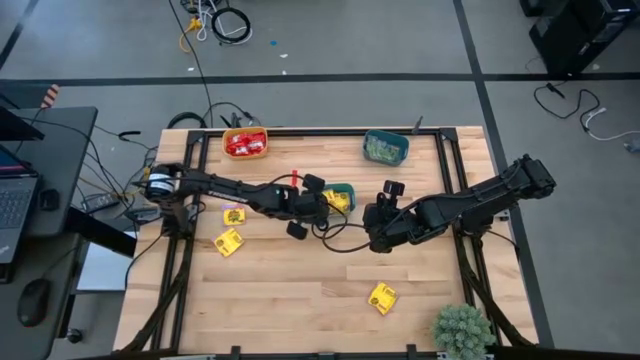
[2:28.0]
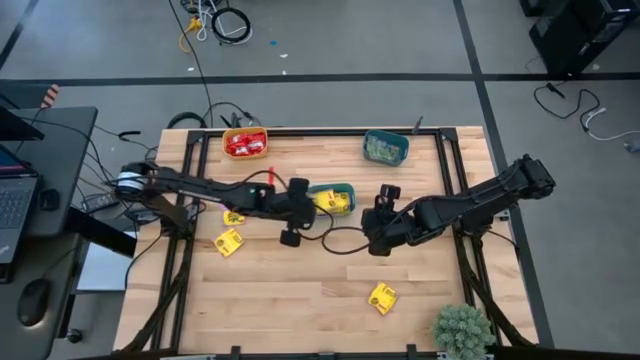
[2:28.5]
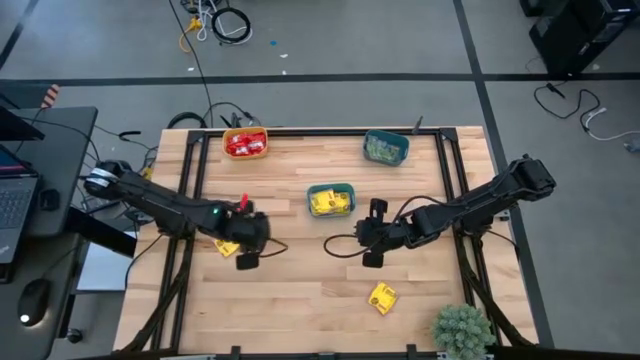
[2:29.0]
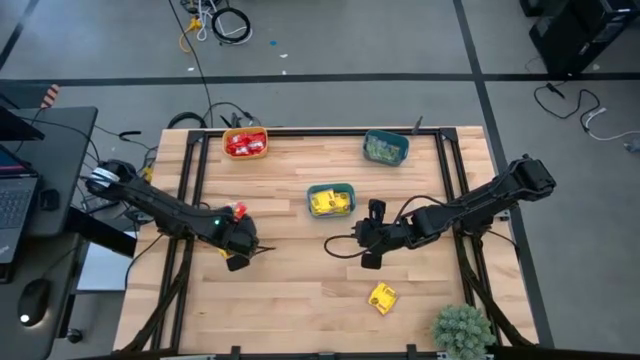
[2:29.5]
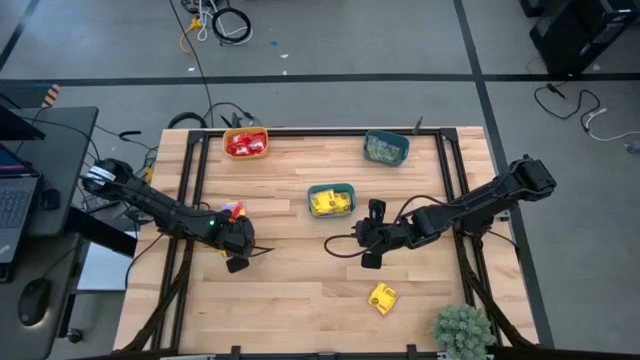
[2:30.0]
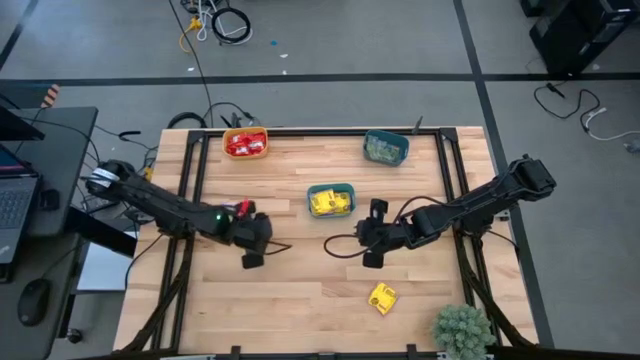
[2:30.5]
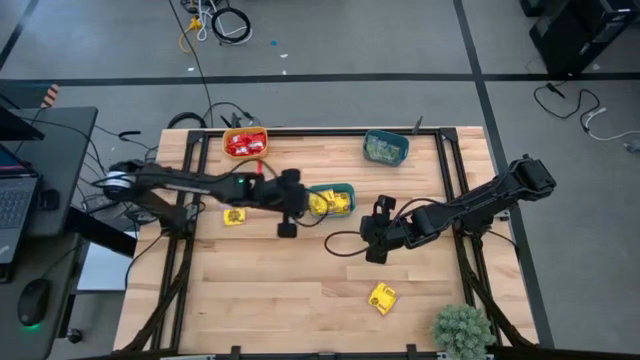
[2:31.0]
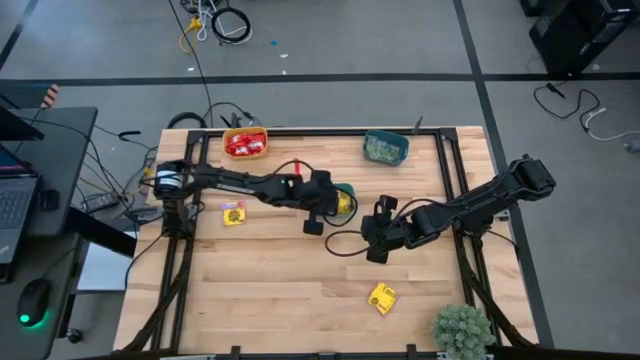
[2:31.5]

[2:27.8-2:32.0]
Task: Sort candy
Put the yellow candy into the green bin

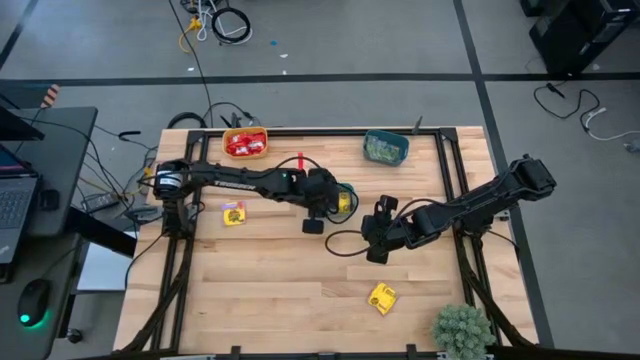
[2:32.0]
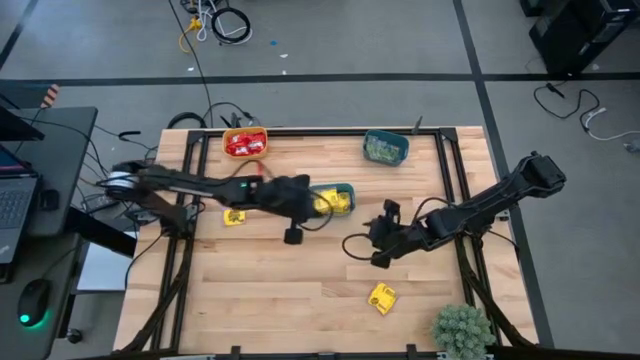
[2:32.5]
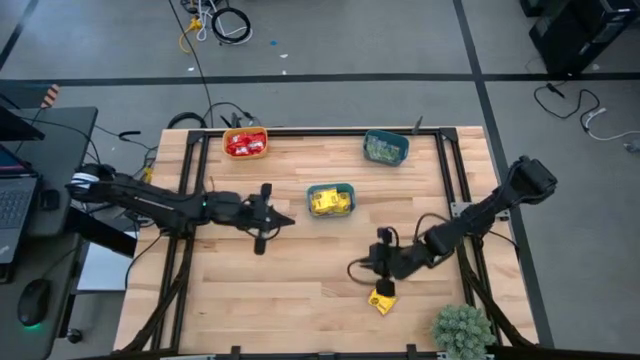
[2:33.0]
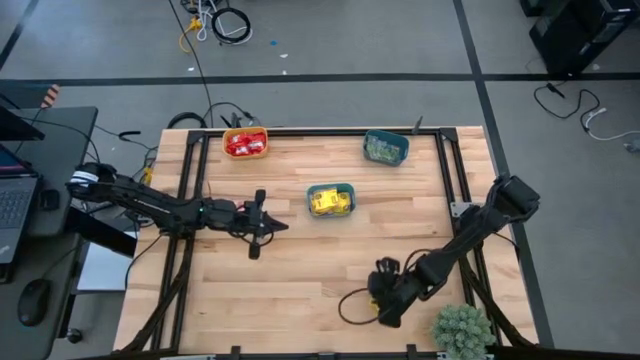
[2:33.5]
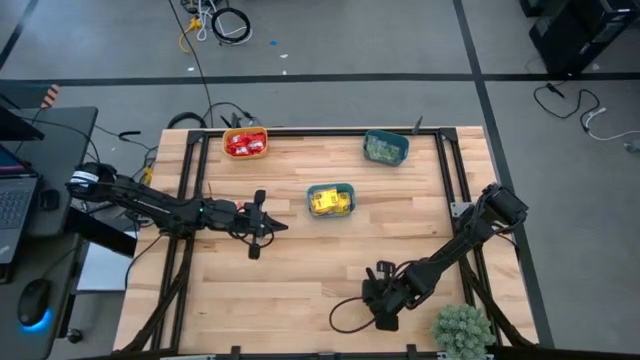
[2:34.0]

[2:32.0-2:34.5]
Put the yellow candy into the green bin

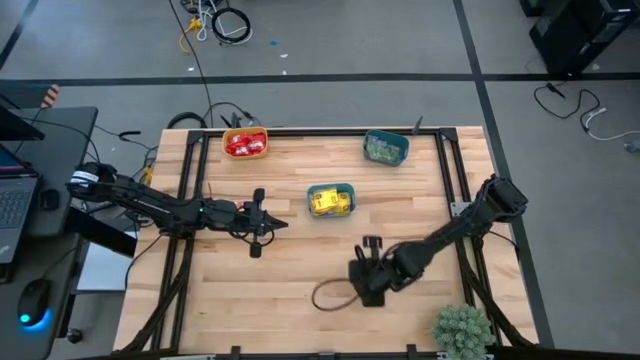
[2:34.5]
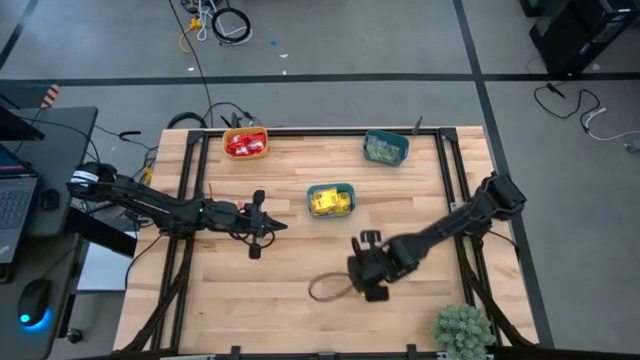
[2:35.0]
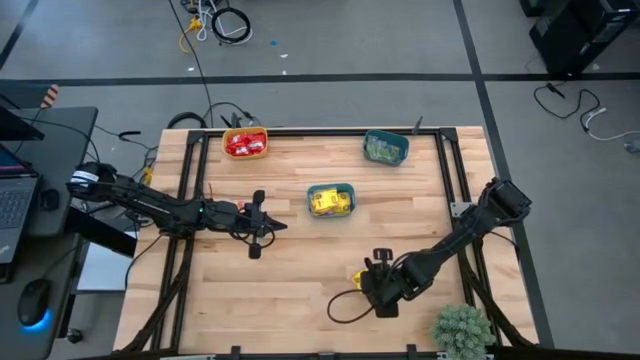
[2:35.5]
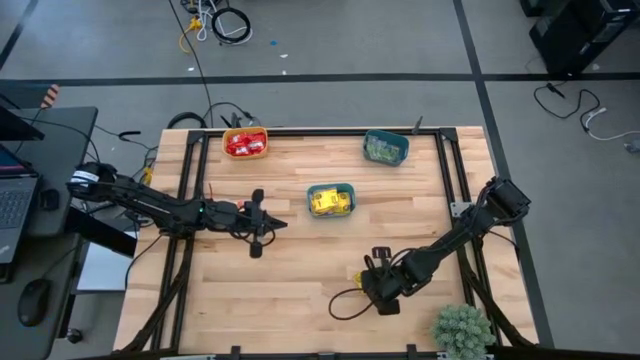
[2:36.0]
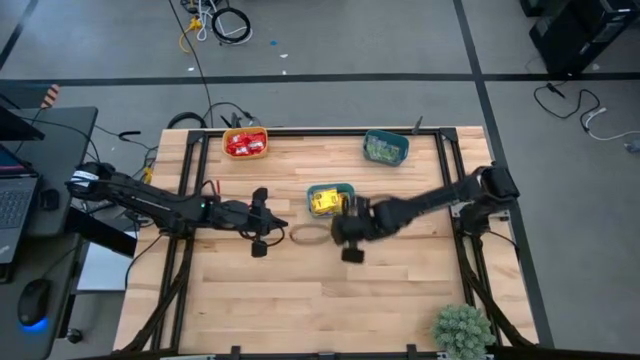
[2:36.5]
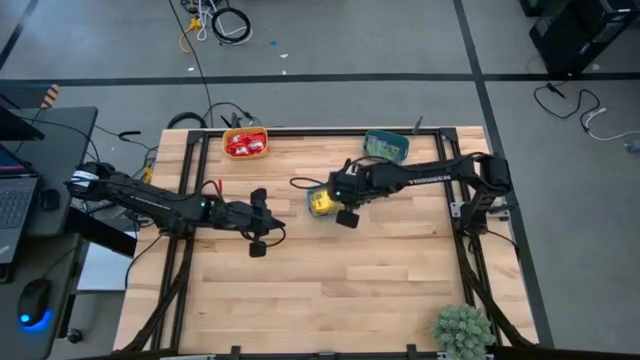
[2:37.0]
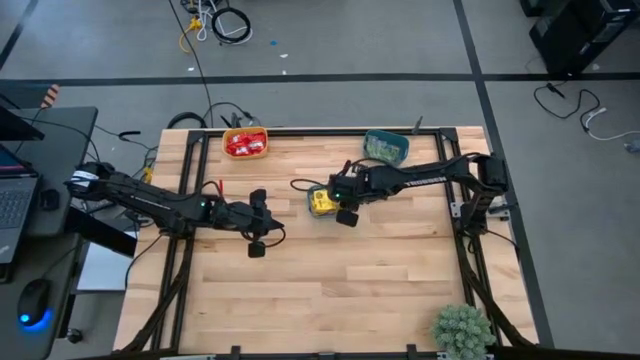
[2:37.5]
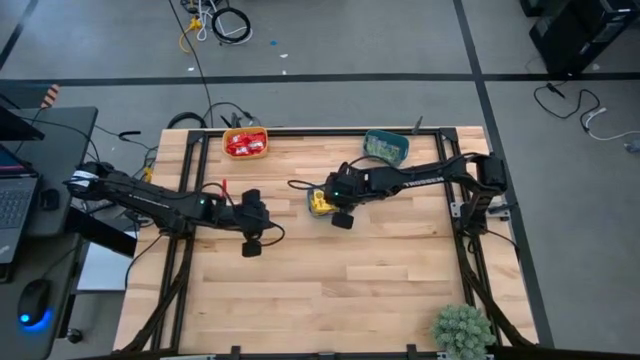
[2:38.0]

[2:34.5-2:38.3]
Put the yellow candy into the green bin

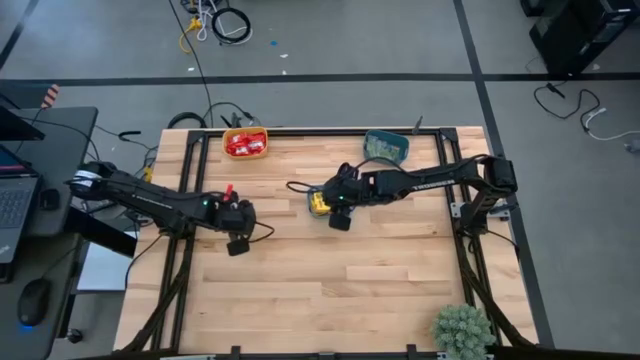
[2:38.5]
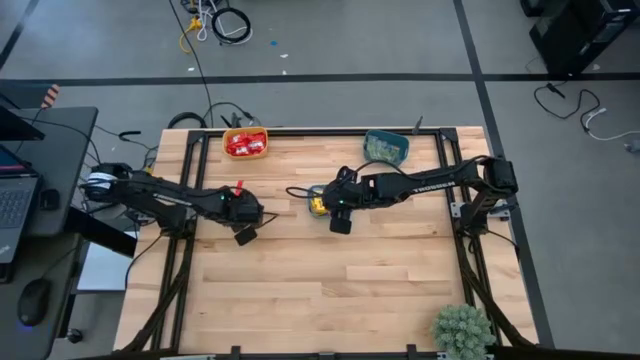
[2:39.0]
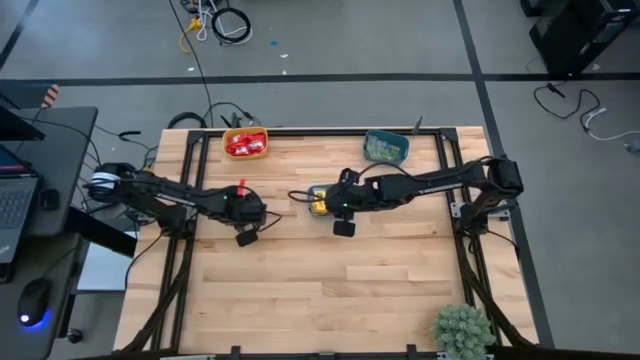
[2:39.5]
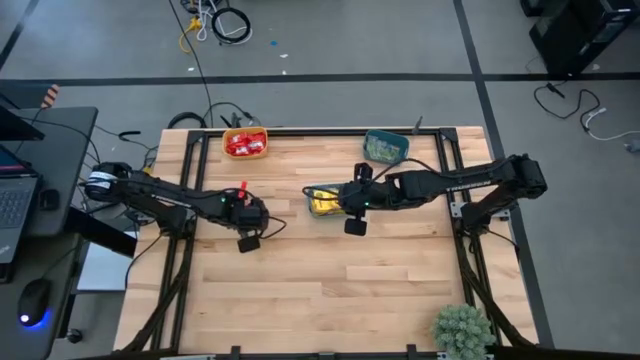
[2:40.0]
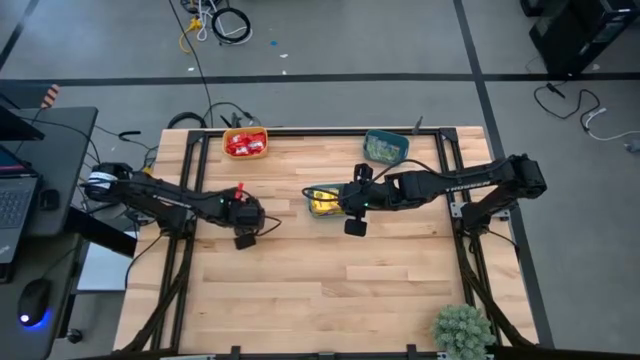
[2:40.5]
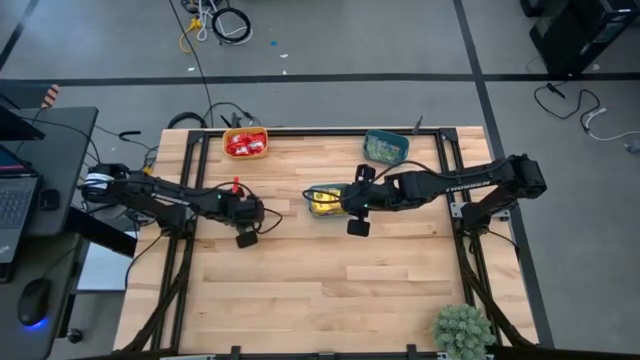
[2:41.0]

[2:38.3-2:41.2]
Put the yellow candy into the green bin

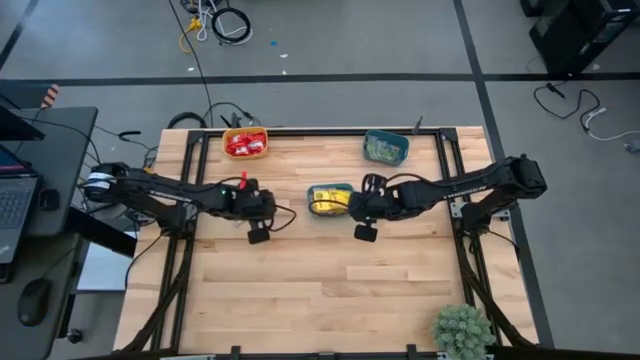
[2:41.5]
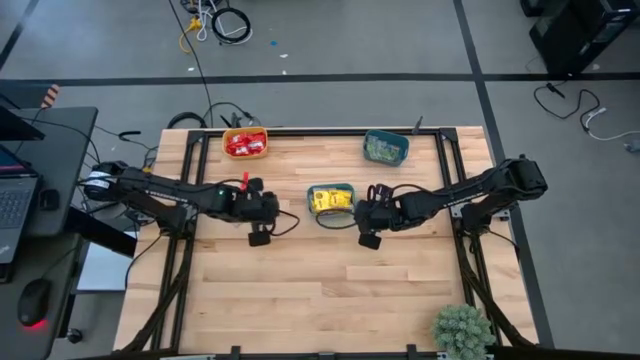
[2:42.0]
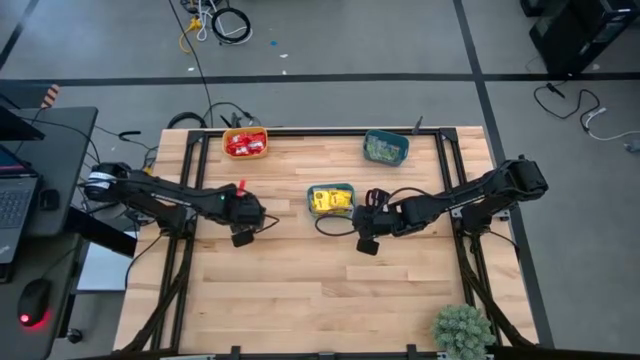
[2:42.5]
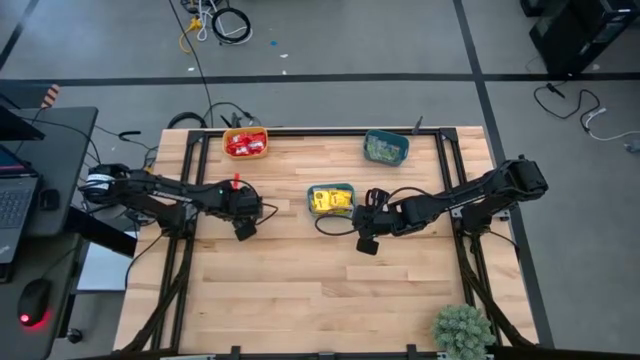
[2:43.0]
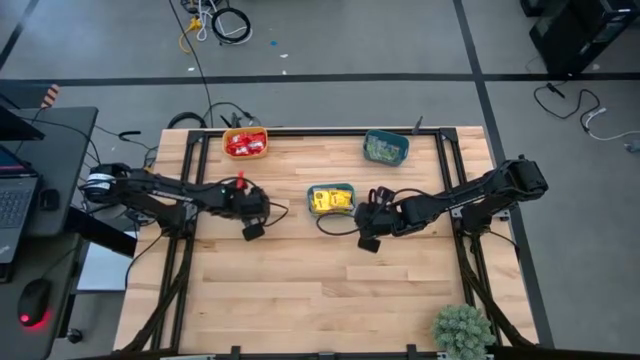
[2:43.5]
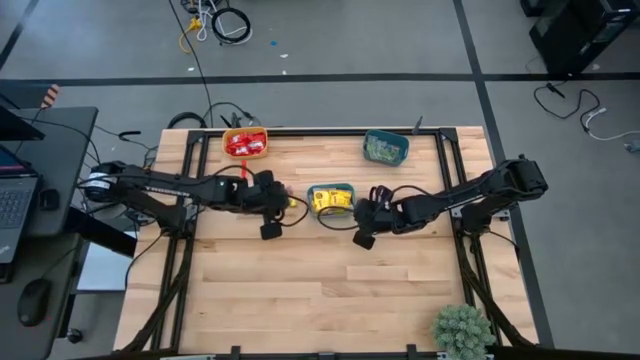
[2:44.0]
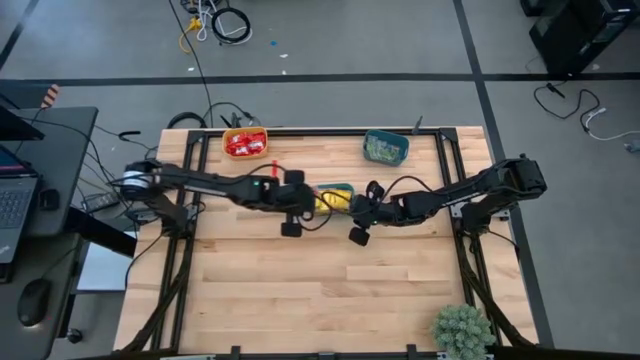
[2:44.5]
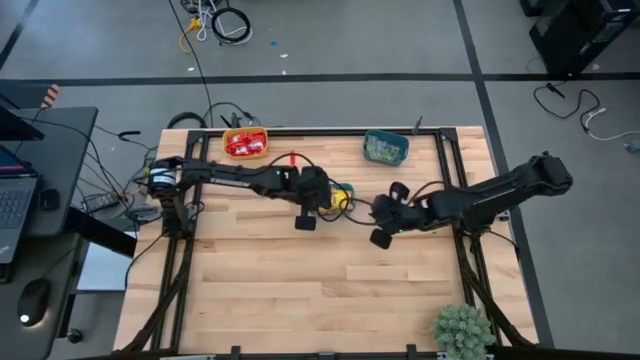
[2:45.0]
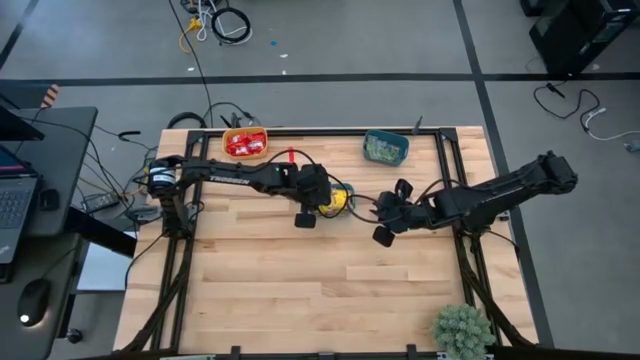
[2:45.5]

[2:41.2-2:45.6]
Put the yellow candy into the green bin

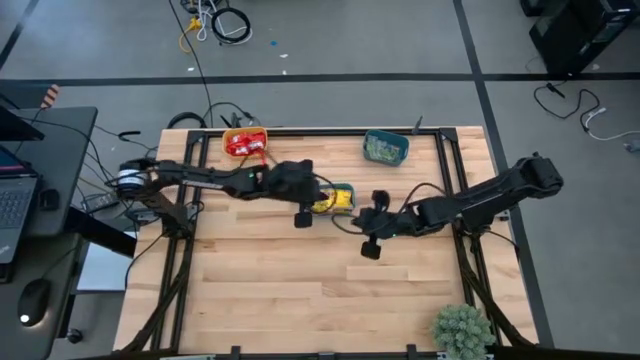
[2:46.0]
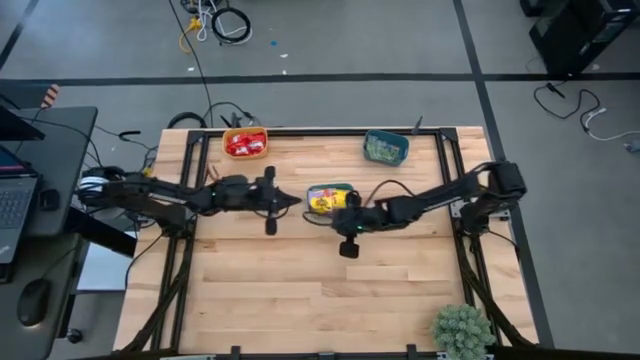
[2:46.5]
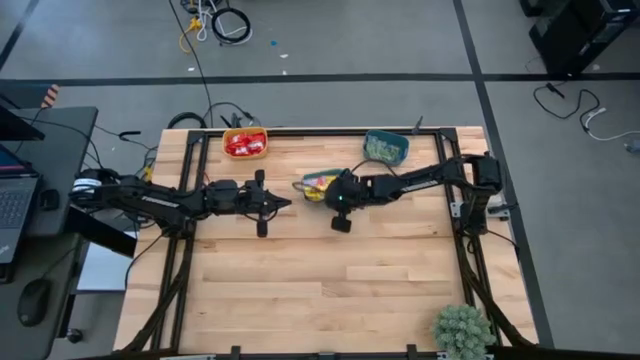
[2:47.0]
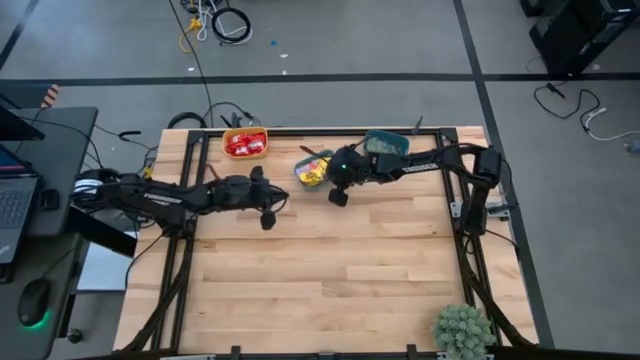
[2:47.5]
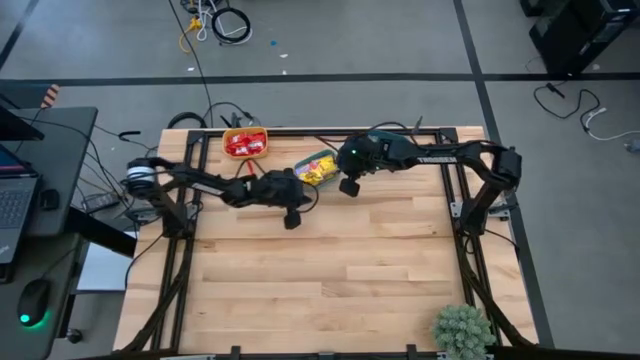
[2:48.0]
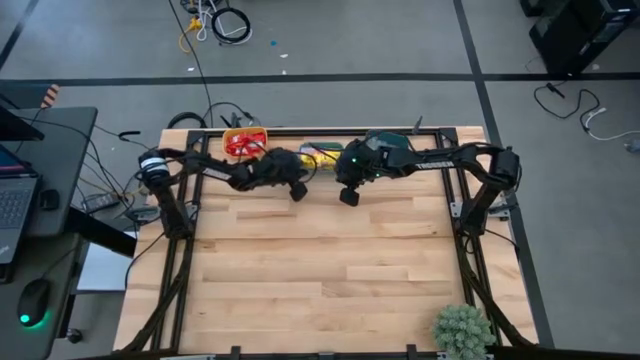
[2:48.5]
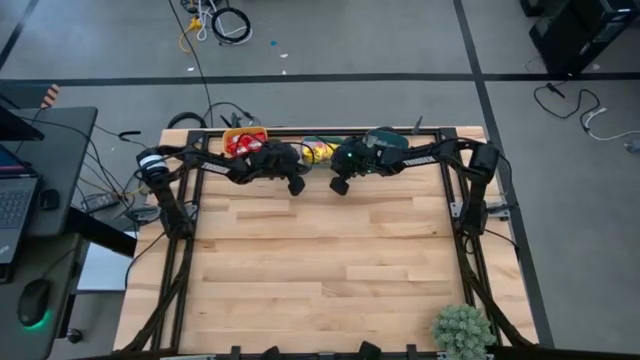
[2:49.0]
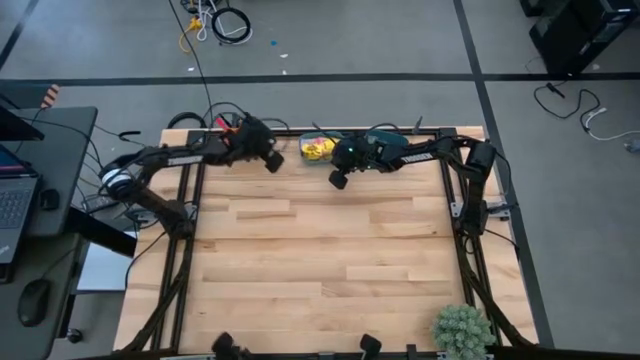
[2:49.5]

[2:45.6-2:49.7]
Move the green bin to the top middle of the table
